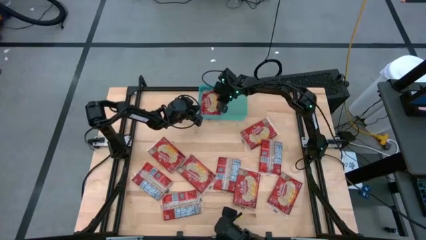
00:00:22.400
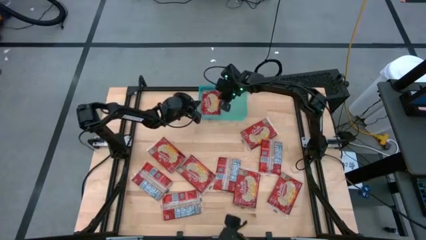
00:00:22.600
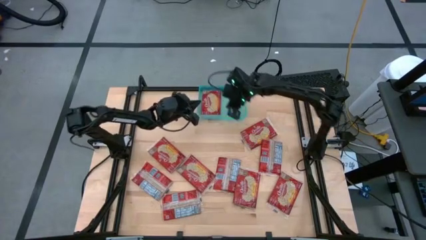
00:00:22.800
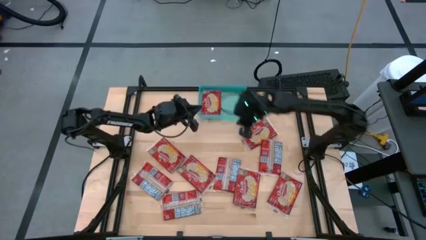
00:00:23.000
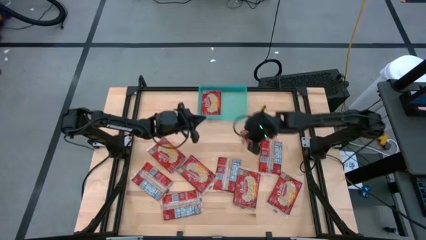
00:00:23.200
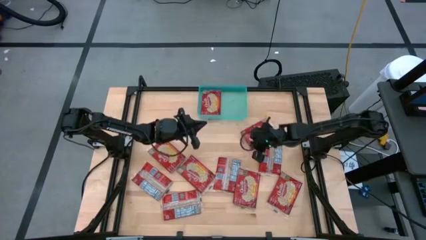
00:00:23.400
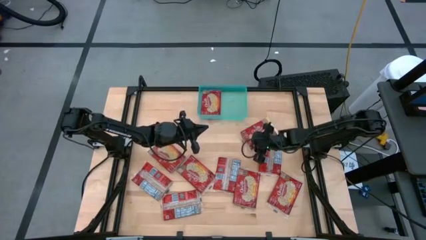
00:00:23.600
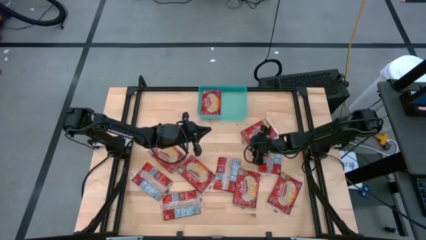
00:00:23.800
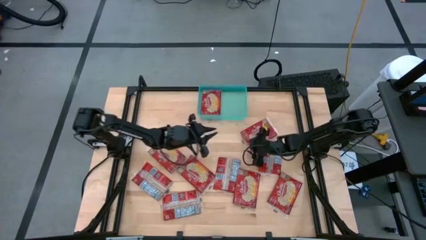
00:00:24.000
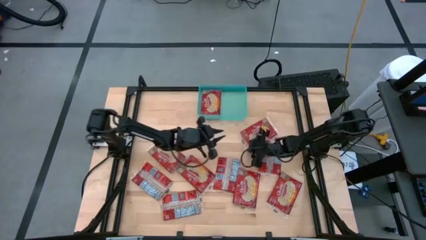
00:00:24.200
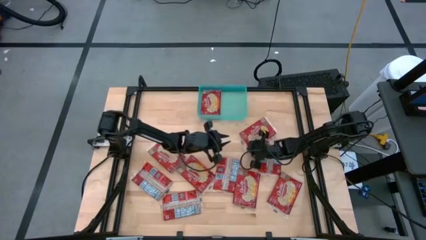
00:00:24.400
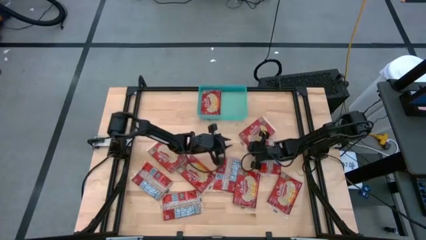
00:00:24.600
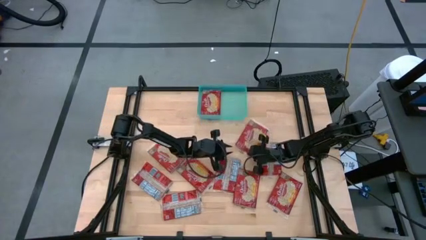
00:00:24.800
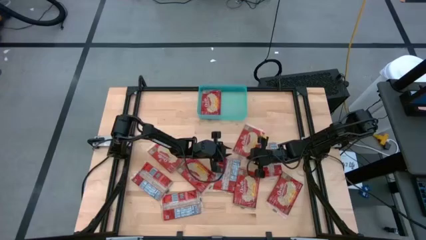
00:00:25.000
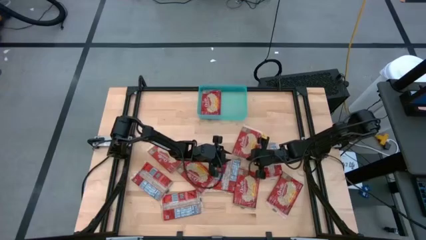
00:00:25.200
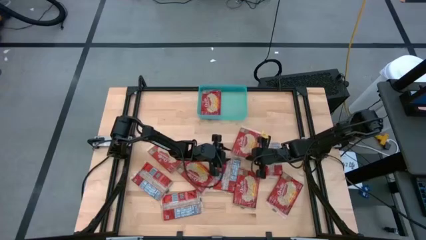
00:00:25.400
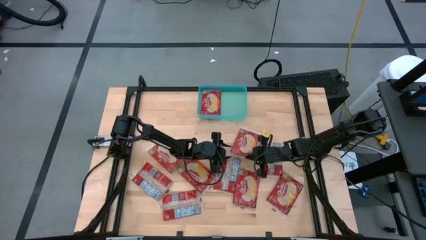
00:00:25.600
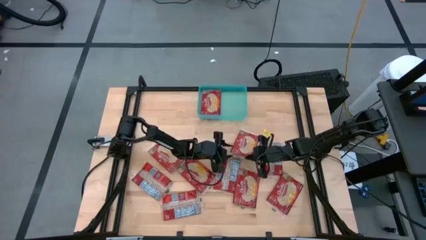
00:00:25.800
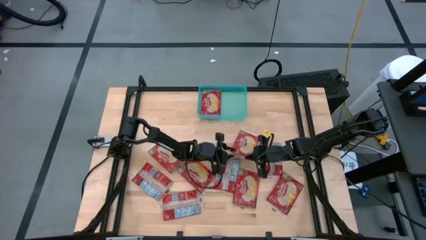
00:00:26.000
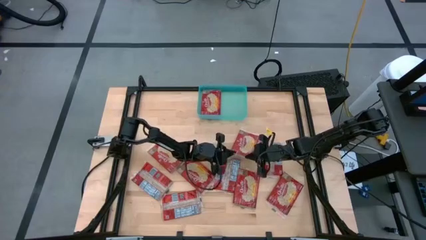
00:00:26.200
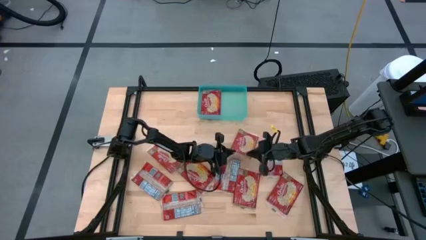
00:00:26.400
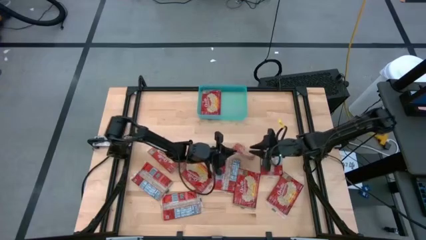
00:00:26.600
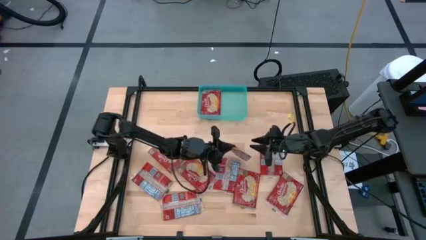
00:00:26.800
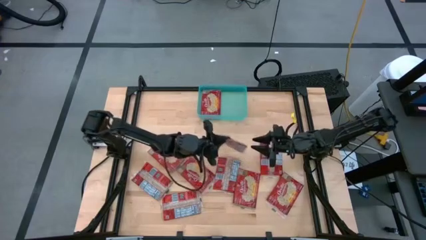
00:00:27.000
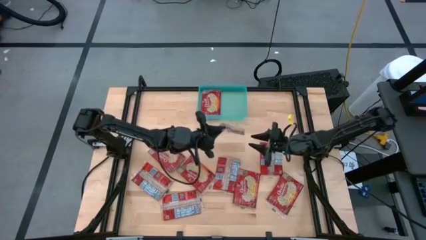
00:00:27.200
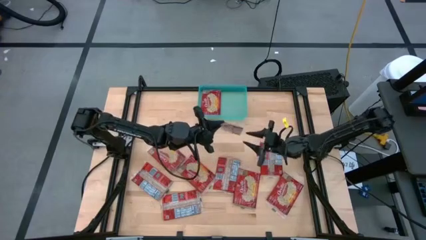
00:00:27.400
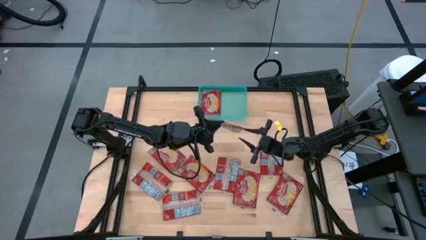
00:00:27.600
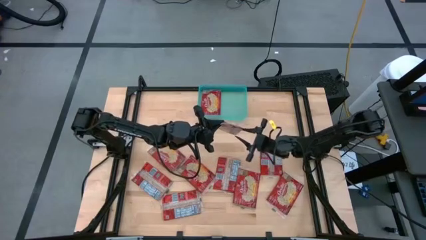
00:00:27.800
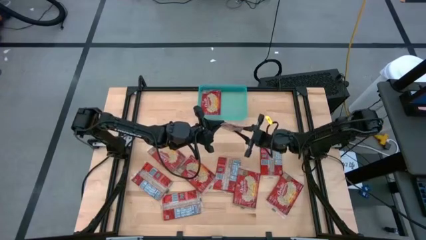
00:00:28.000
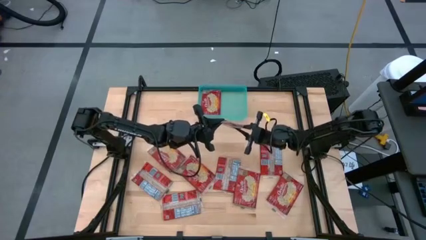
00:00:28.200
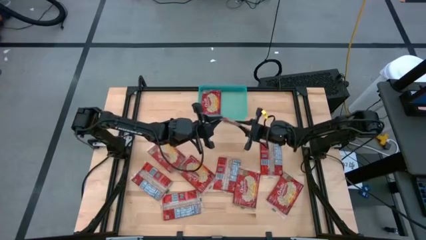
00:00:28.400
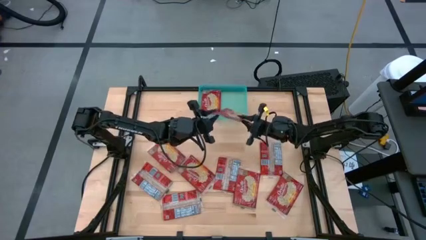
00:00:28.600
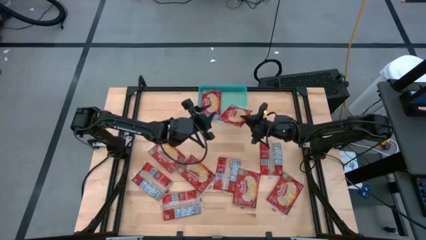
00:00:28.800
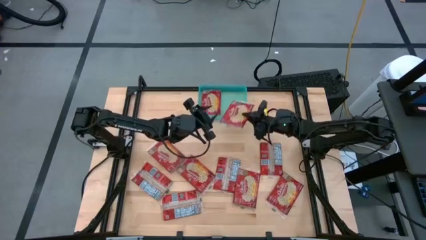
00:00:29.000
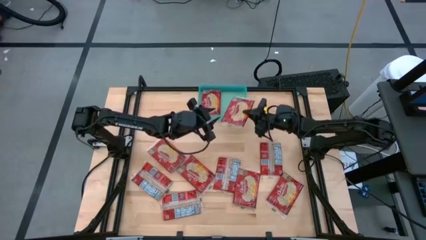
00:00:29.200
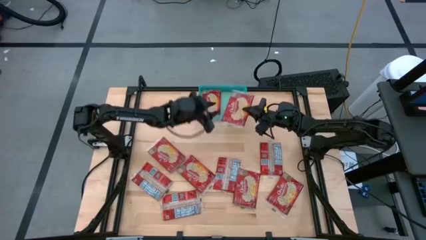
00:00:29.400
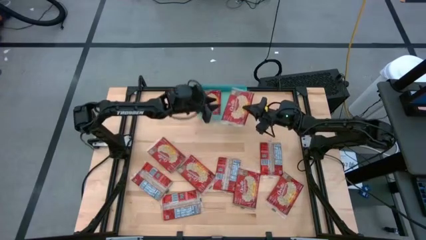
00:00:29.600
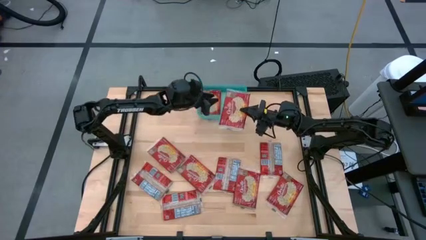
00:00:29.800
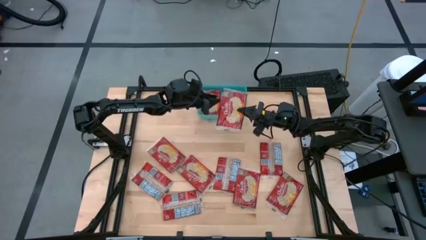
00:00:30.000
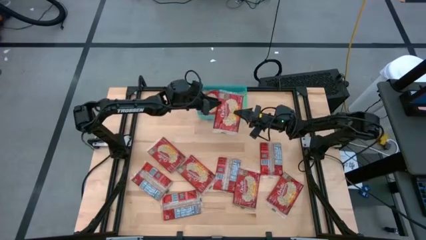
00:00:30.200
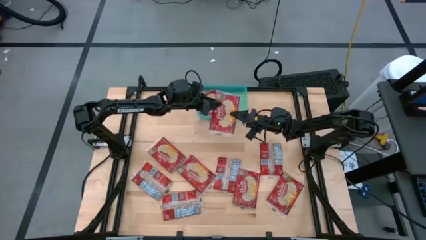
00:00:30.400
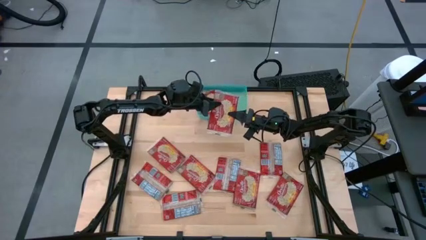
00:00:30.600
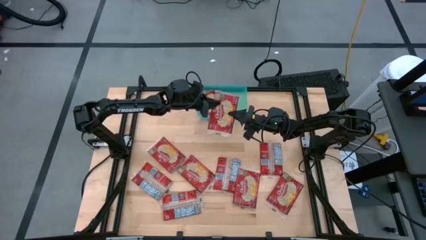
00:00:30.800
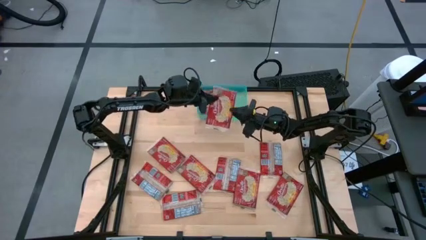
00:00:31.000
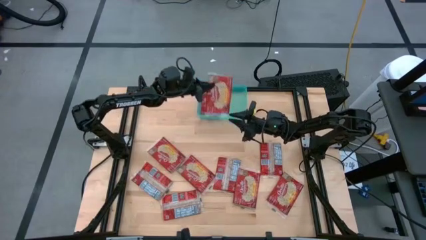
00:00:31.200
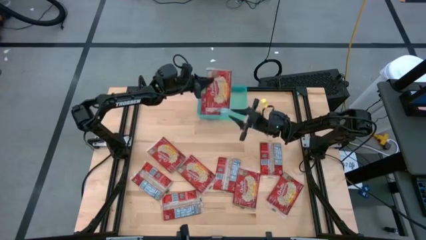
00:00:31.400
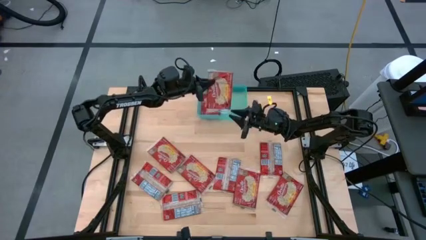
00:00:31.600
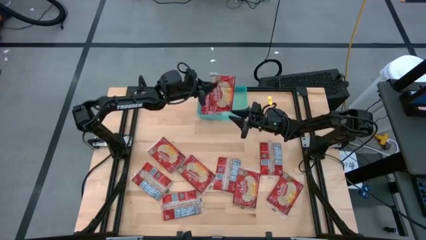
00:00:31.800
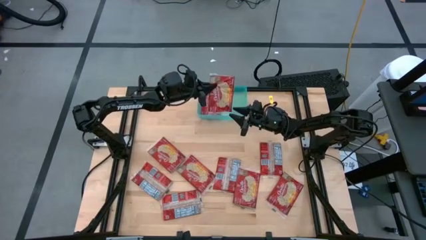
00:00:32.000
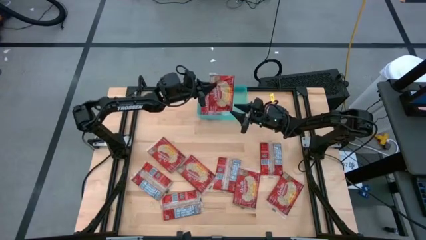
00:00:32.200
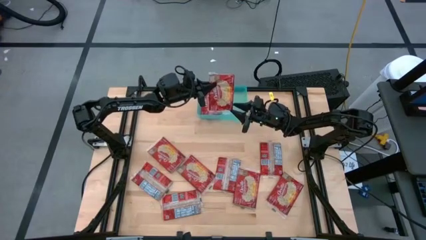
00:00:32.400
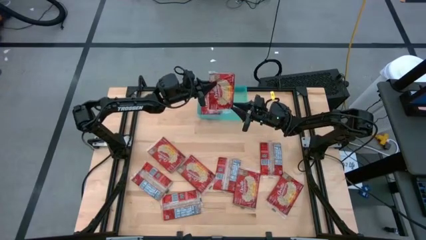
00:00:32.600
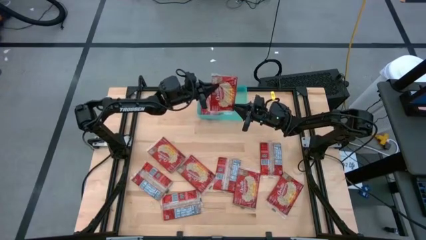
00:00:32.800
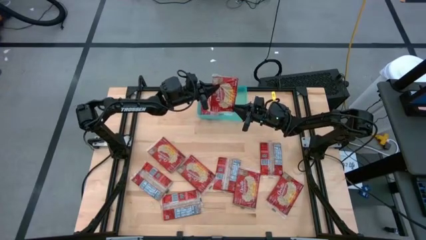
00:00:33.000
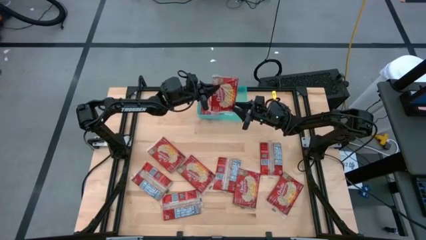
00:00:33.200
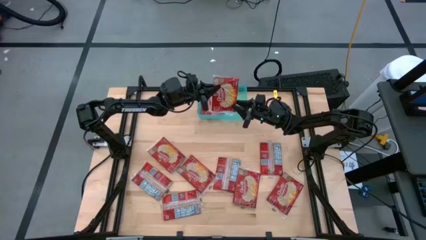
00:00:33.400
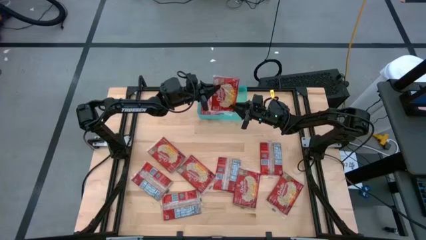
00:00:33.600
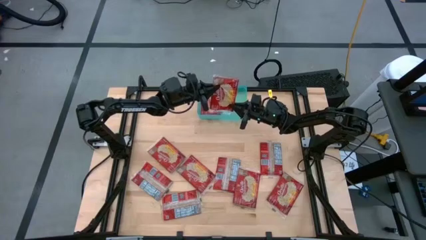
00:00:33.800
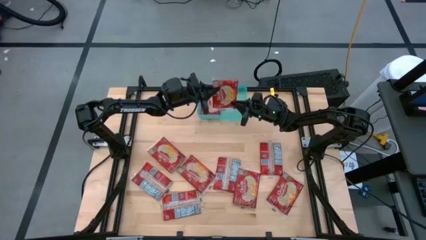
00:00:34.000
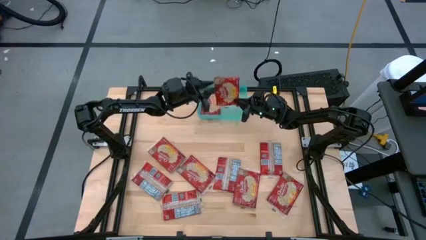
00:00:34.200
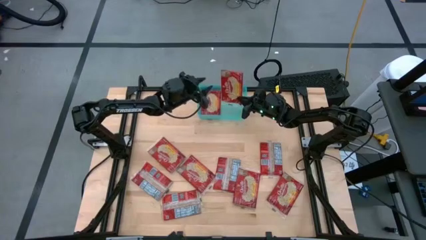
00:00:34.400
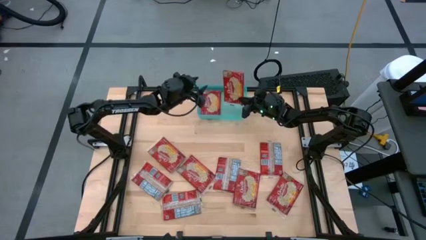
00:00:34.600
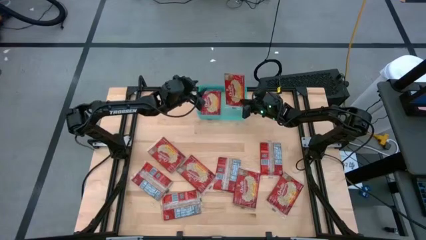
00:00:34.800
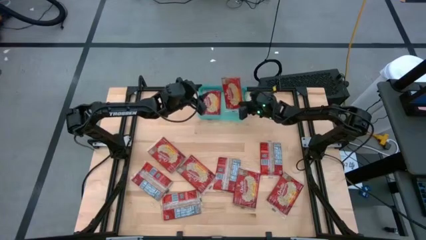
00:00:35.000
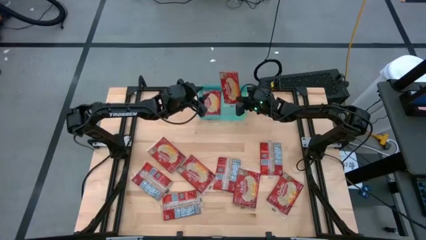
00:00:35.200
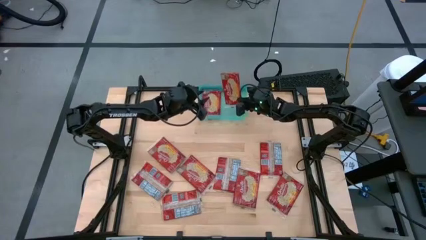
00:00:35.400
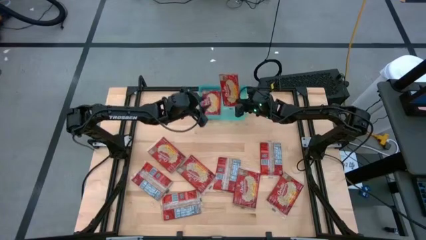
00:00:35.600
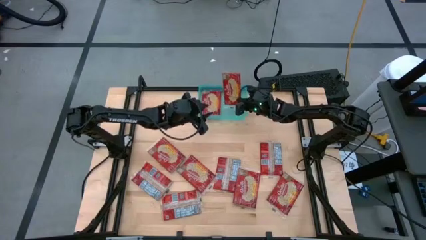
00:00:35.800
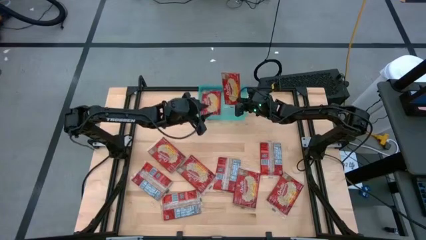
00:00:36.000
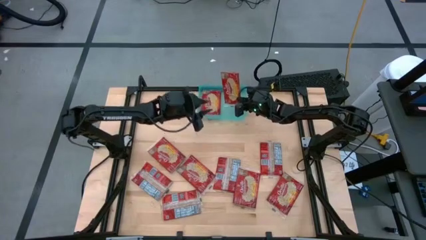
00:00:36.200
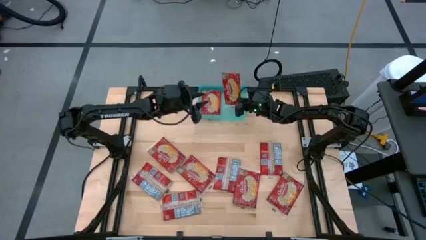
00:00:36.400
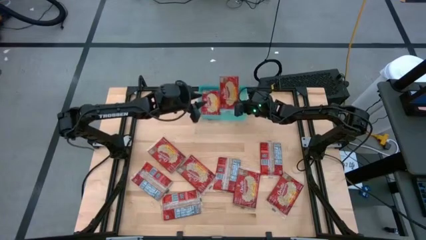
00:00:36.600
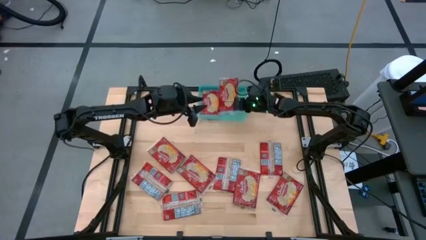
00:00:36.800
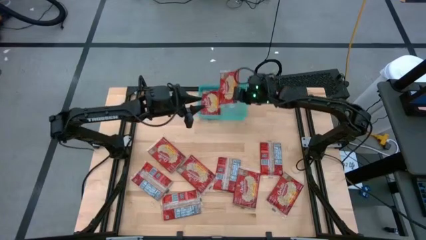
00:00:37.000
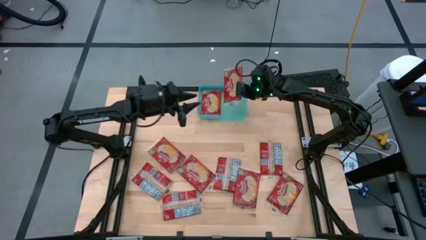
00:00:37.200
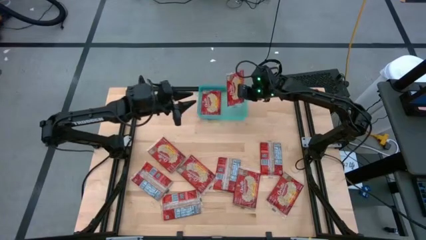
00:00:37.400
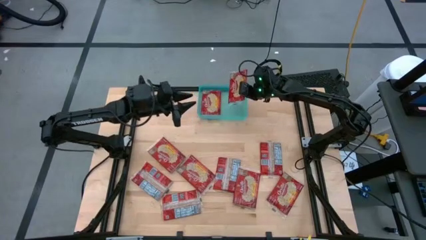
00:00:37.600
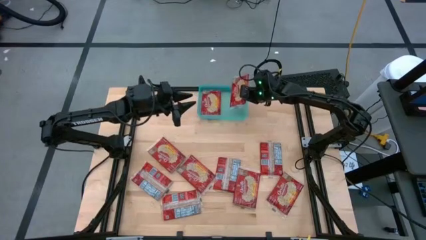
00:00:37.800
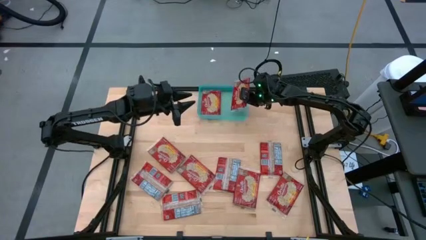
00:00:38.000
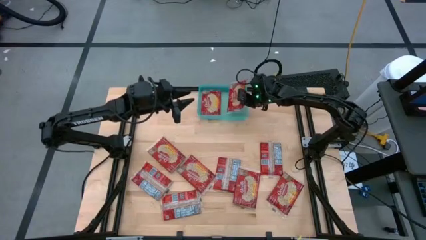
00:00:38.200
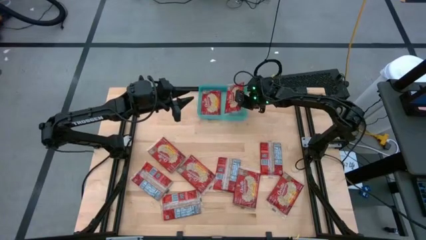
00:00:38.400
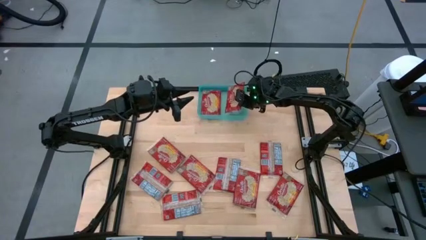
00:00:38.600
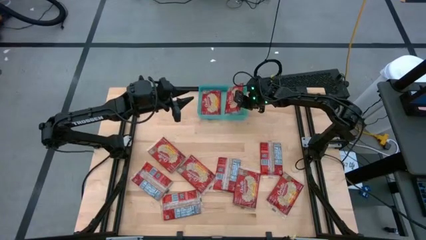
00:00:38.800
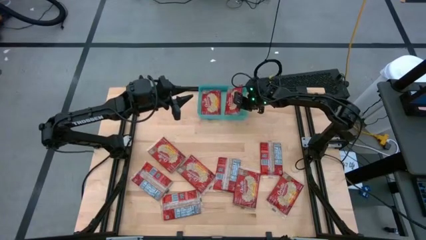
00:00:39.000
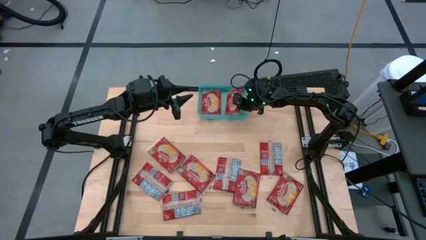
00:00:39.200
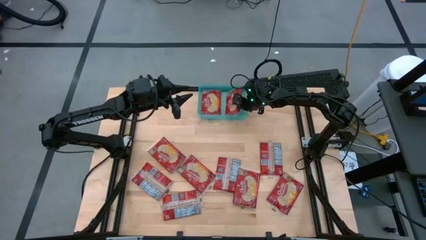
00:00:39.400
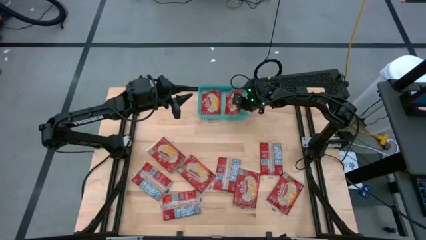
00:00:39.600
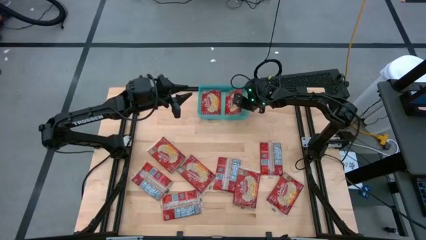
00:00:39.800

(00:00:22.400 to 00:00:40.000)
Task: Sort popcorn bags into baskets
Put the red popcorn bag into the blue bin
